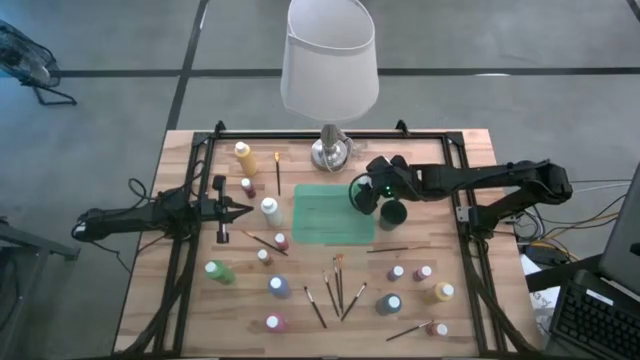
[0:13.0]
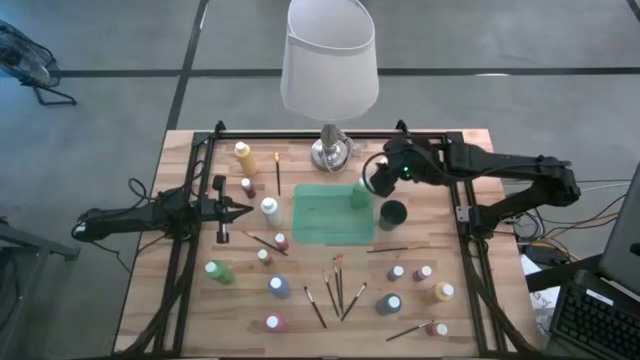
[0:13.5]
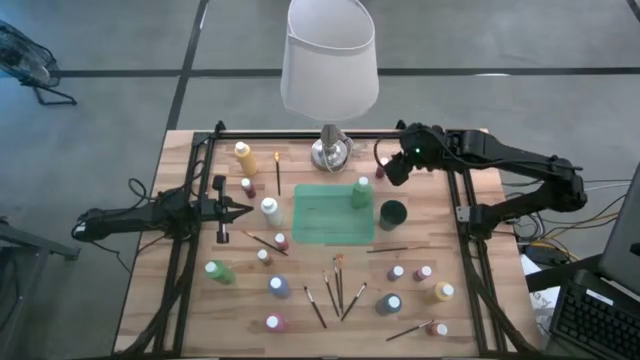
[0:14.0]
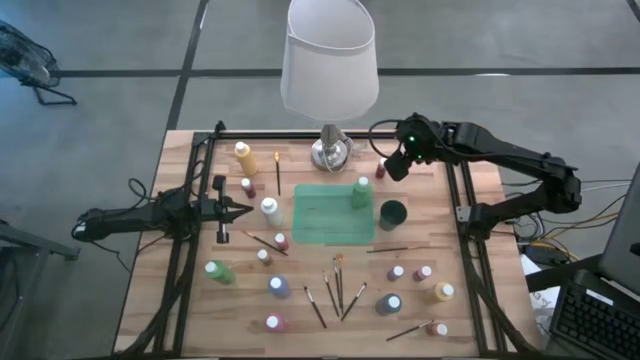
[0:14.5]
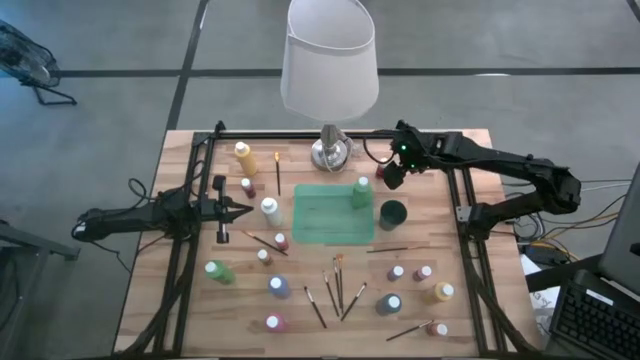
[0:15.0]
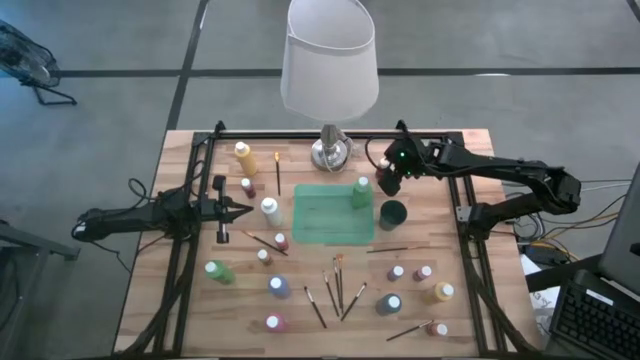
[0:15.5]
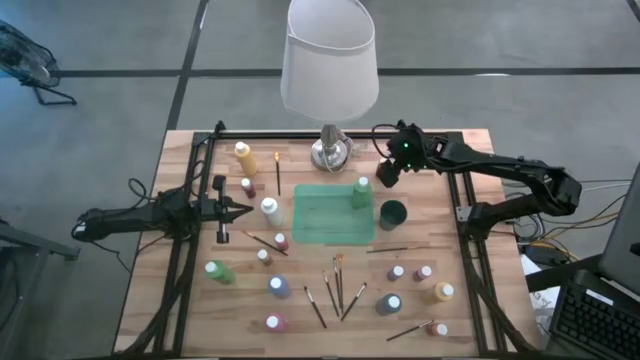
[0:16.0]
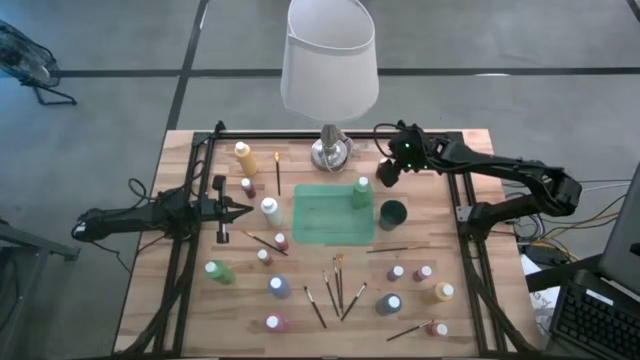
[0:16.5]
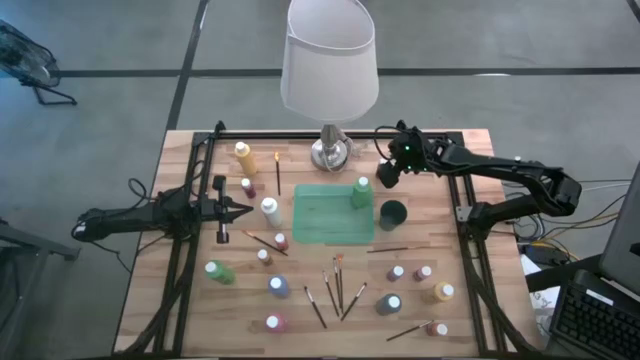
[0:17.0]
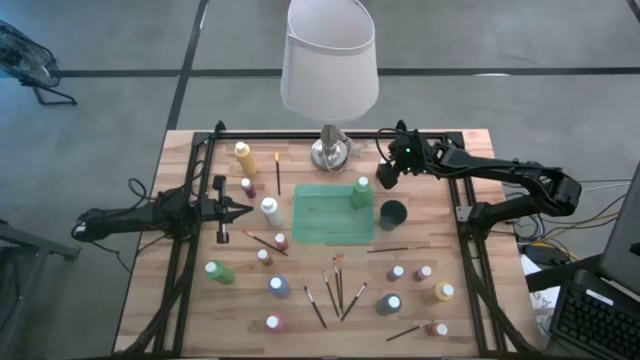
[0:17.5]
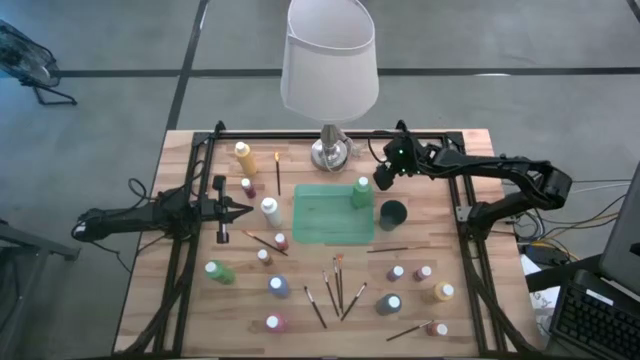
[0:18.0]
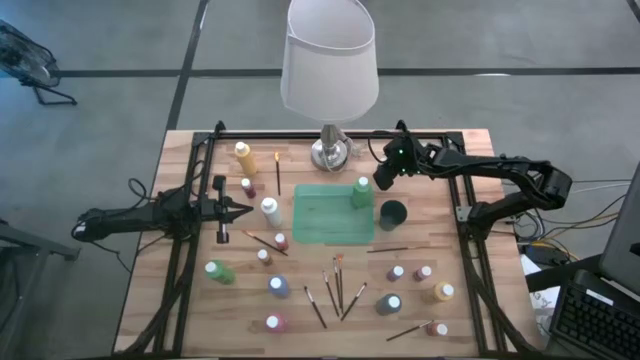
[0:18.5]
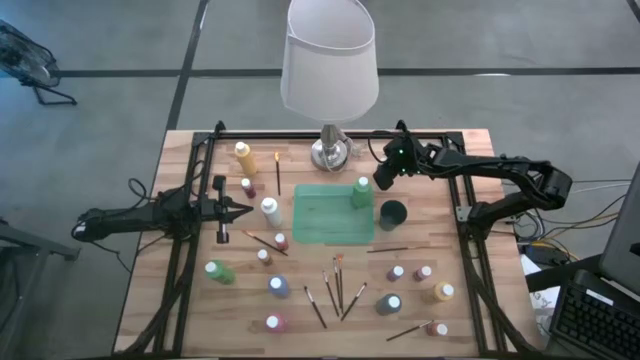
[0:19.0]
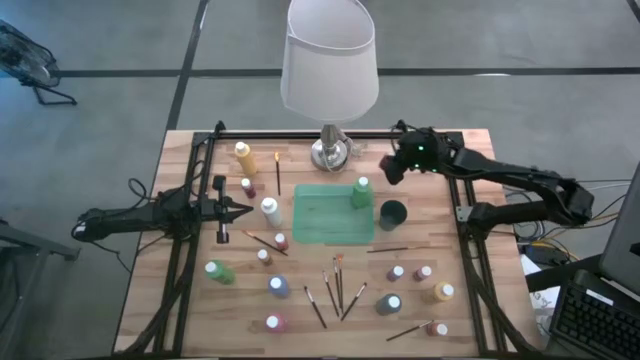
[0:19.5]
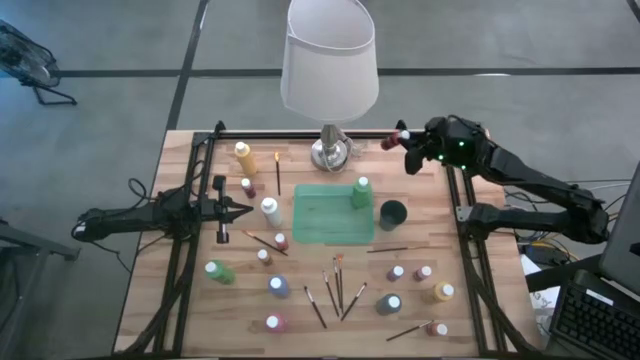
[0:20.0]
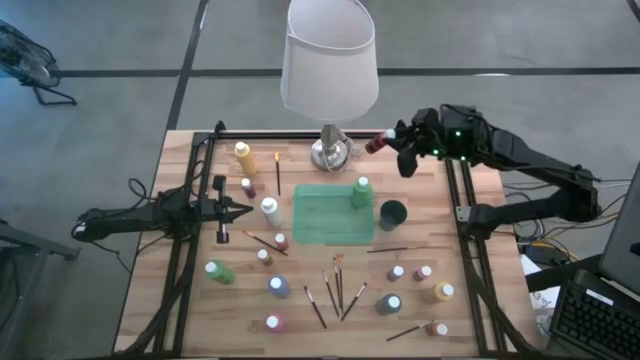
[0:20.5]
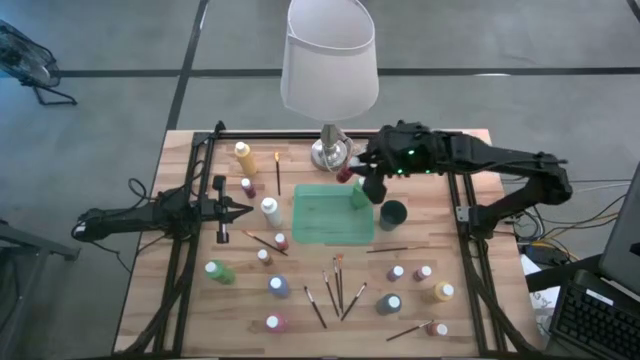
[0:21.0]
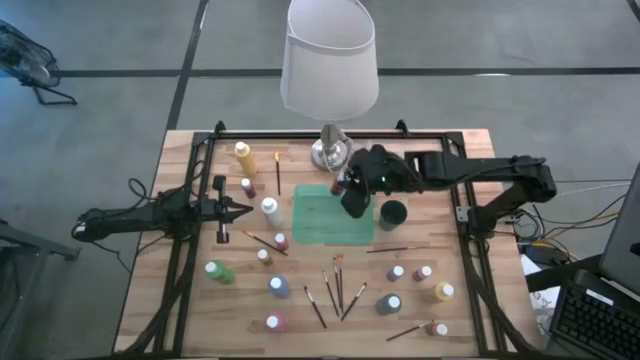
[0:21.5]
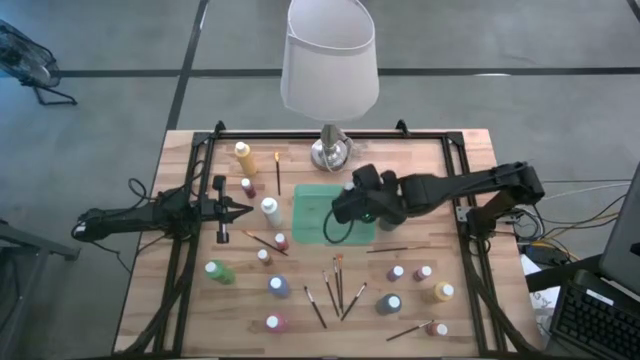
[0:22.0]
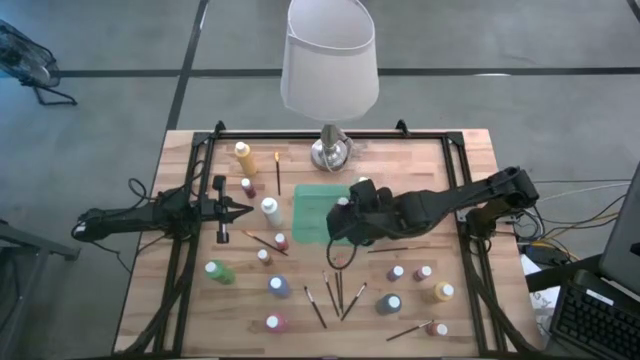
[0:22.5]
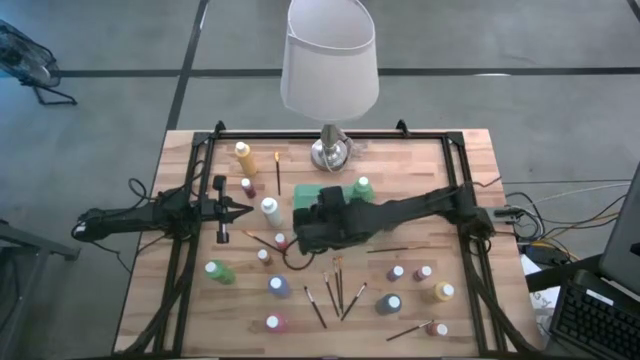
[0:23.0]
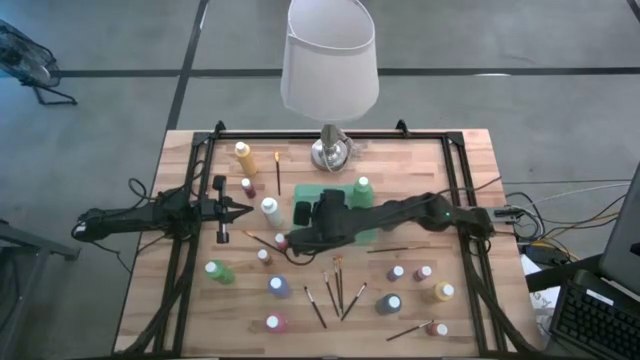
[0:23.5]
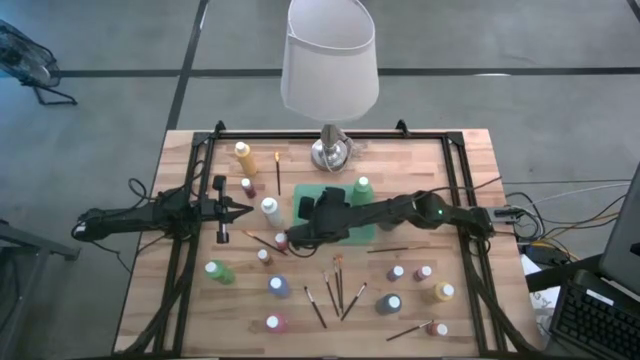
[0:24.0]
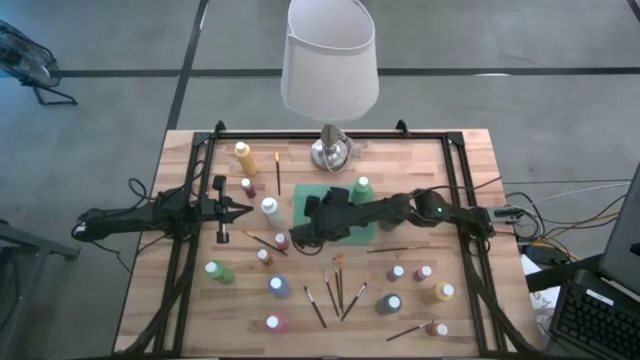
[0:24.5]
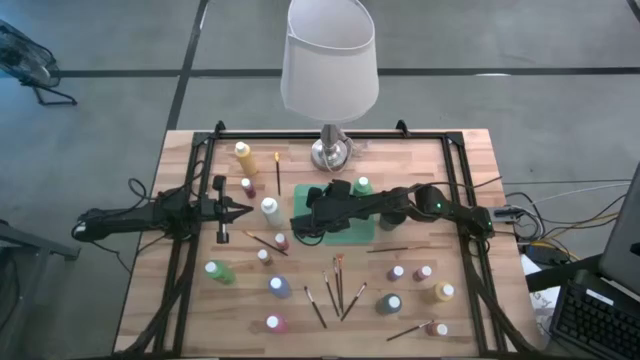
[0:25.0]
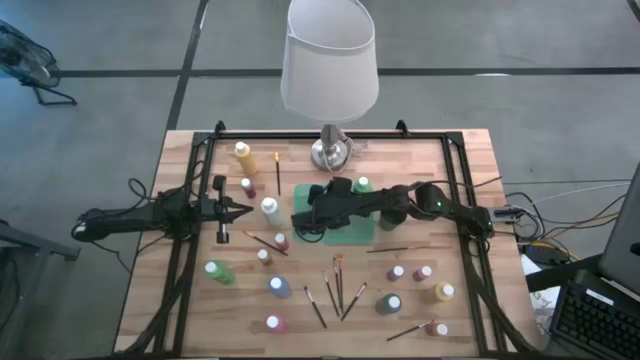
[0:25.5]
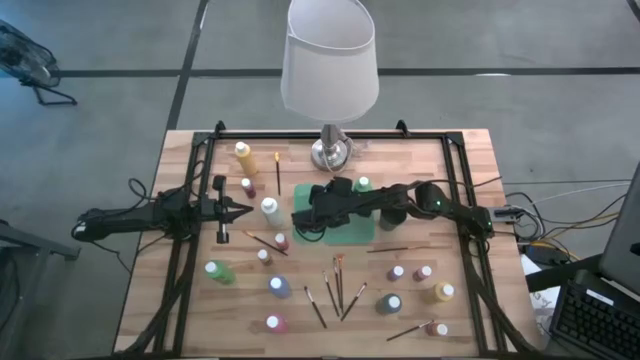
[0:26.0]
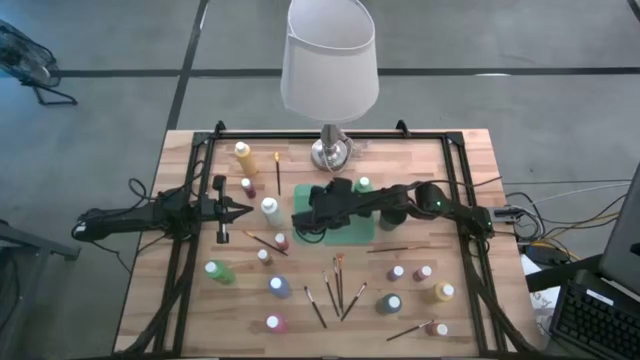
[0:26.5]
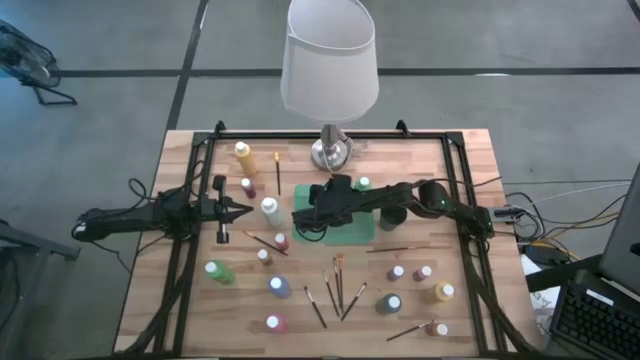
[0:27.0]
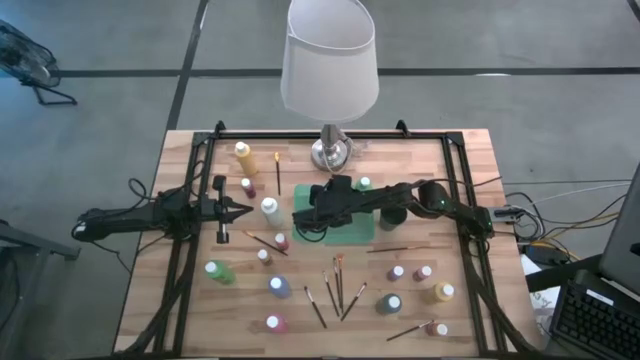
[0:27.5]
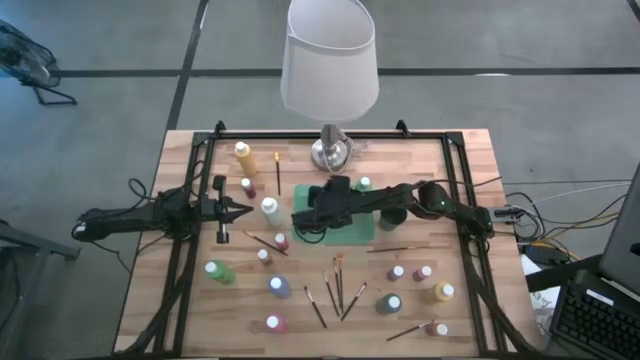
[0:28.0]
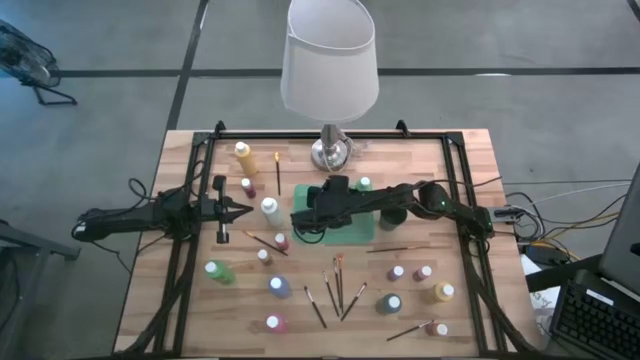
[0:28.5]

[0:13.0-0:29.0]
Task: Pick & Place Paint Supplies
Put the orange paint bottle into the green bin
